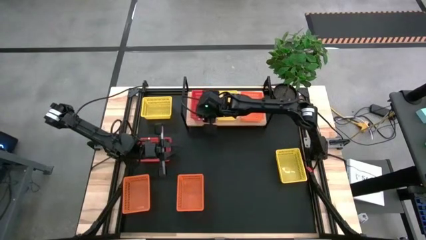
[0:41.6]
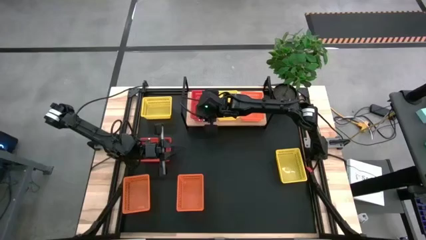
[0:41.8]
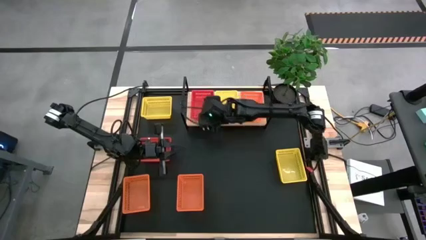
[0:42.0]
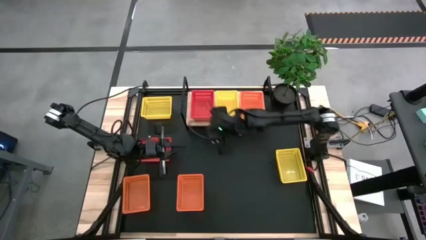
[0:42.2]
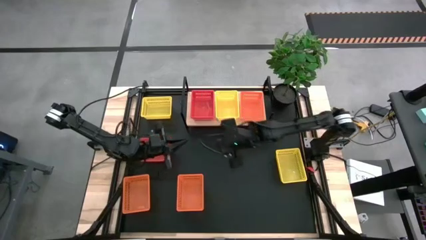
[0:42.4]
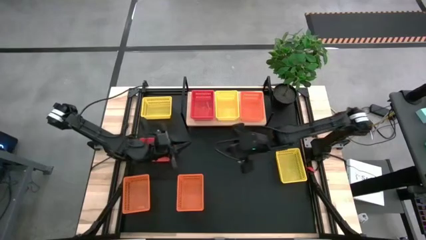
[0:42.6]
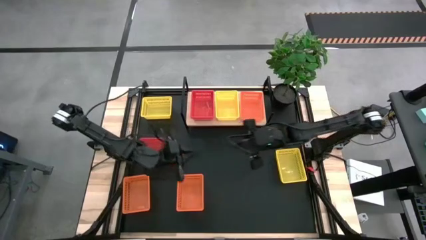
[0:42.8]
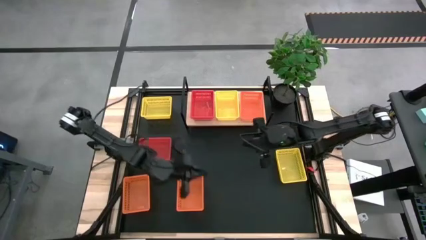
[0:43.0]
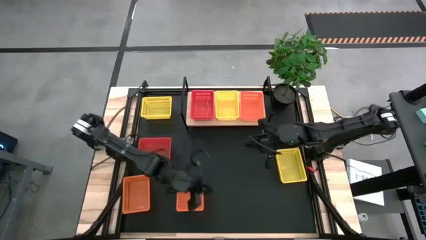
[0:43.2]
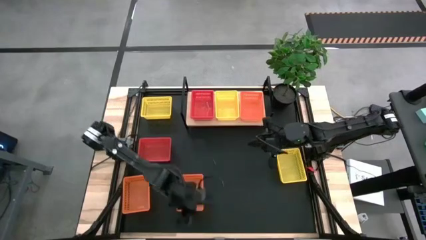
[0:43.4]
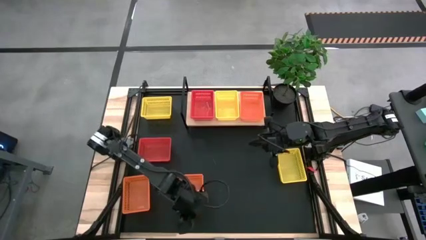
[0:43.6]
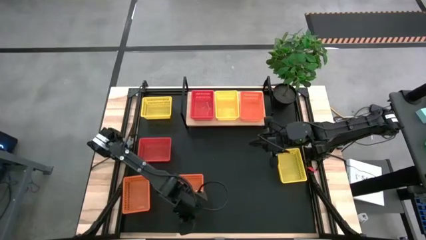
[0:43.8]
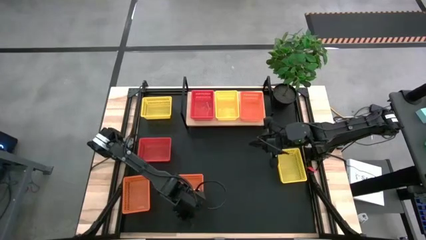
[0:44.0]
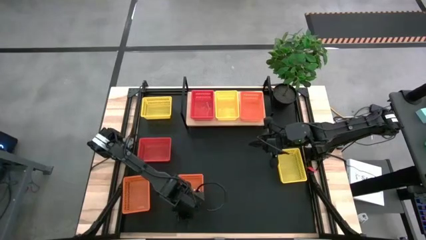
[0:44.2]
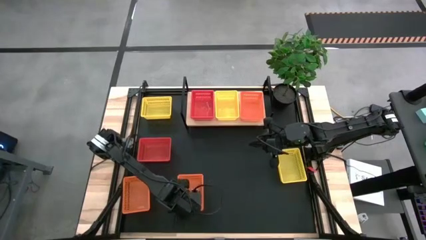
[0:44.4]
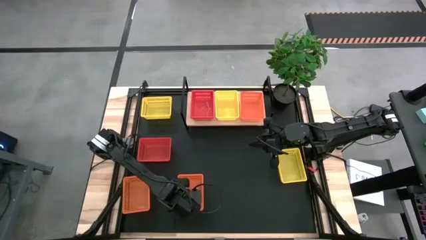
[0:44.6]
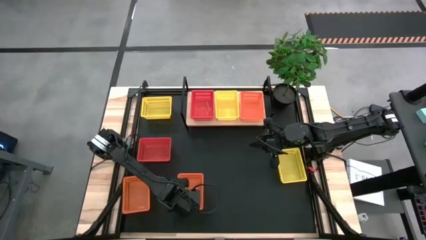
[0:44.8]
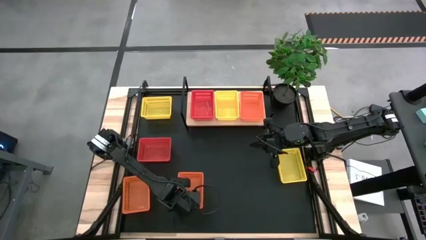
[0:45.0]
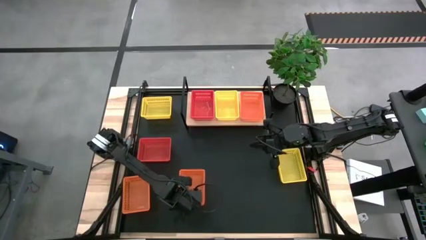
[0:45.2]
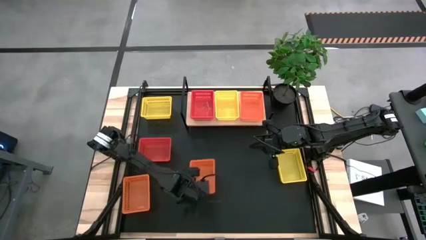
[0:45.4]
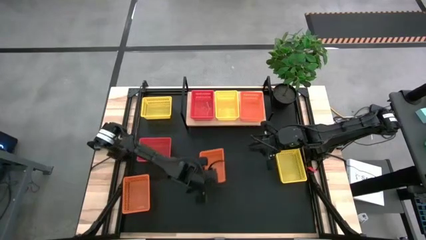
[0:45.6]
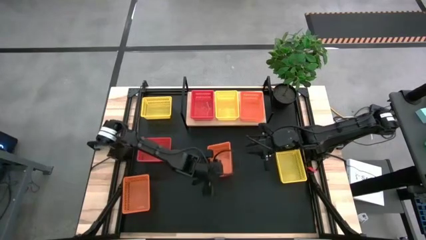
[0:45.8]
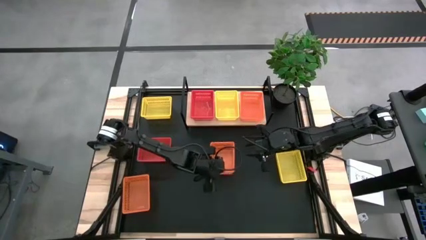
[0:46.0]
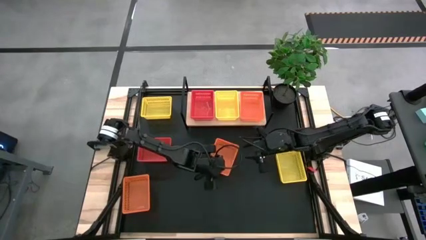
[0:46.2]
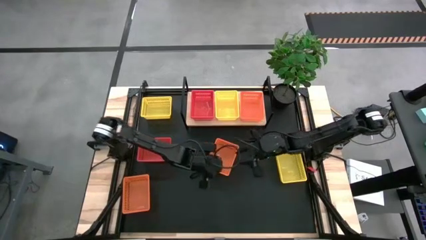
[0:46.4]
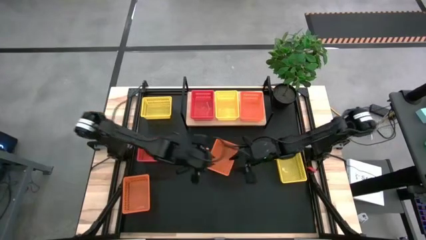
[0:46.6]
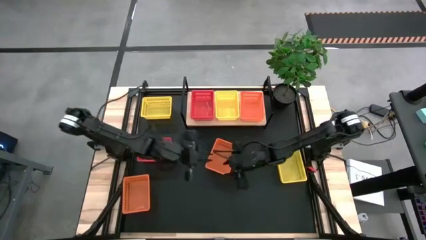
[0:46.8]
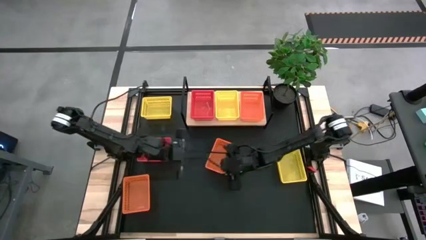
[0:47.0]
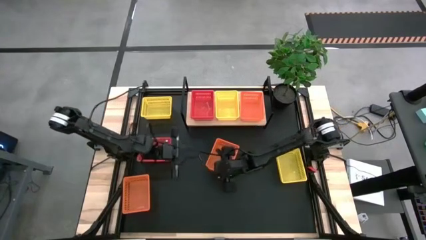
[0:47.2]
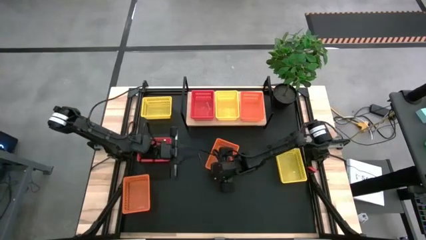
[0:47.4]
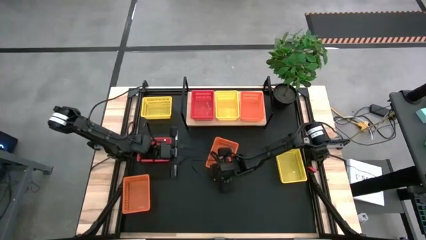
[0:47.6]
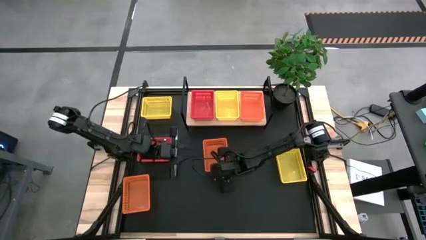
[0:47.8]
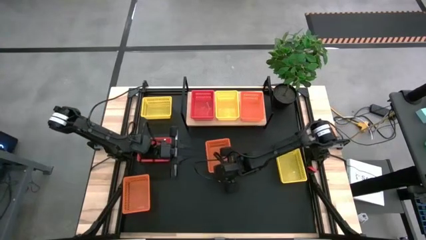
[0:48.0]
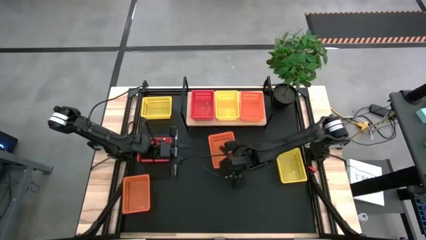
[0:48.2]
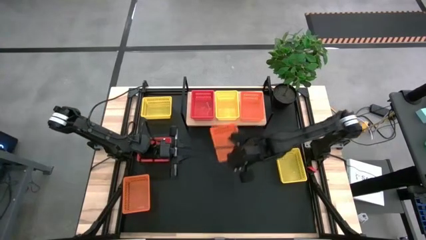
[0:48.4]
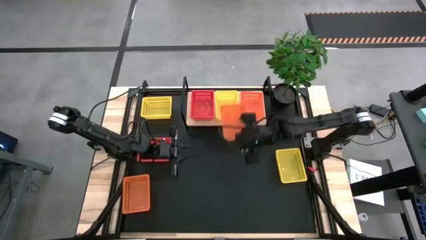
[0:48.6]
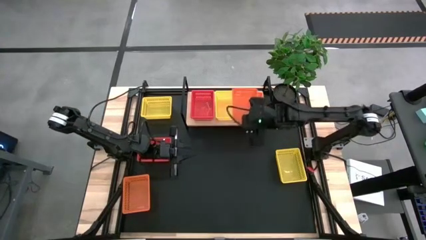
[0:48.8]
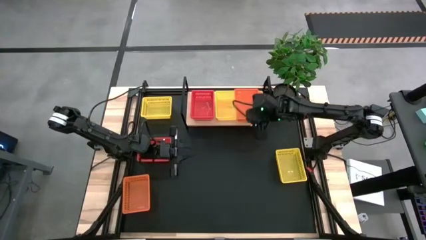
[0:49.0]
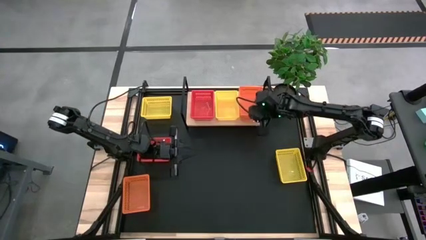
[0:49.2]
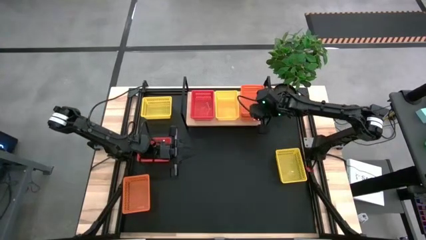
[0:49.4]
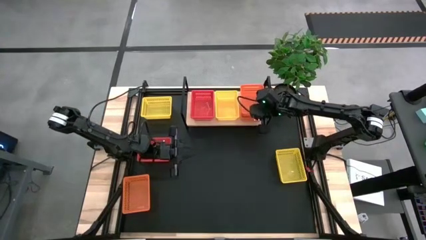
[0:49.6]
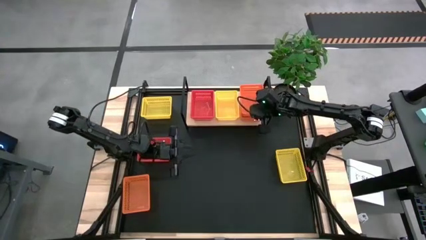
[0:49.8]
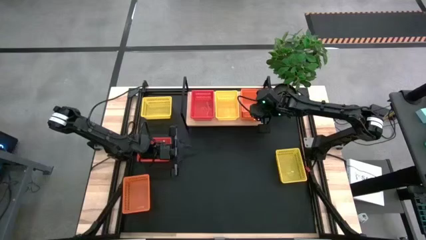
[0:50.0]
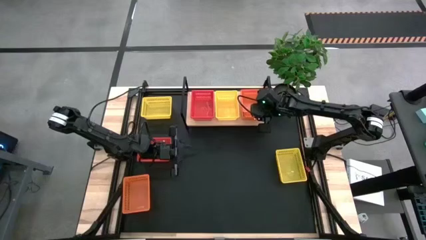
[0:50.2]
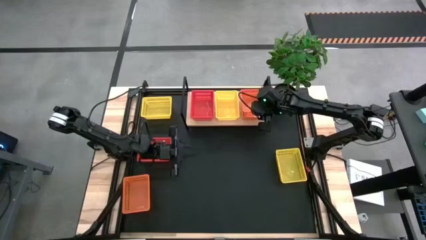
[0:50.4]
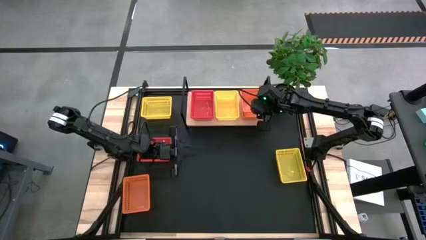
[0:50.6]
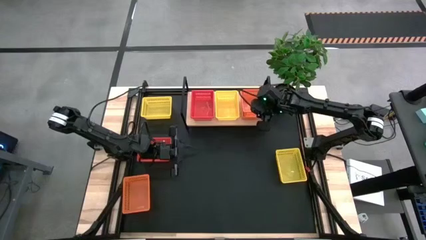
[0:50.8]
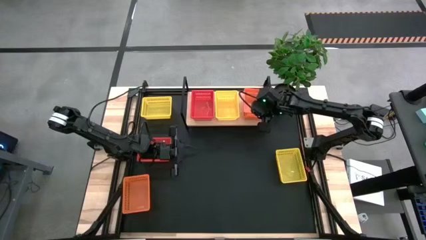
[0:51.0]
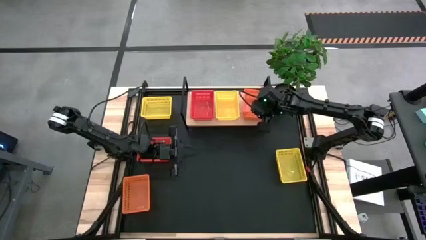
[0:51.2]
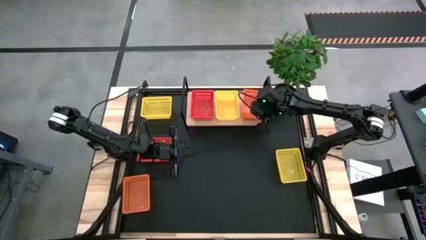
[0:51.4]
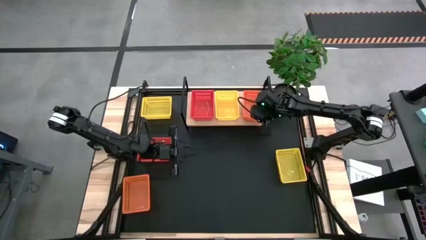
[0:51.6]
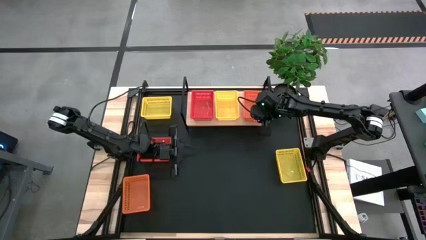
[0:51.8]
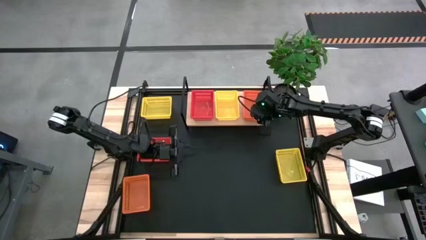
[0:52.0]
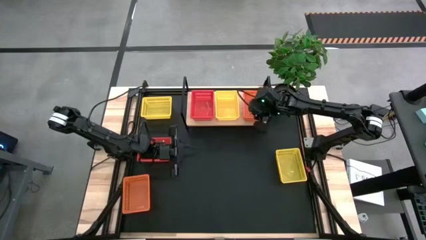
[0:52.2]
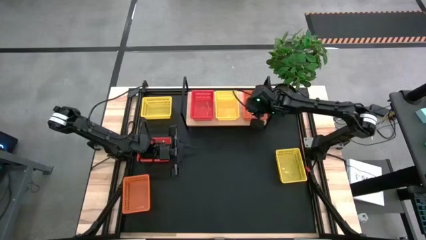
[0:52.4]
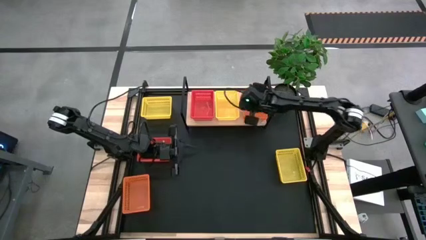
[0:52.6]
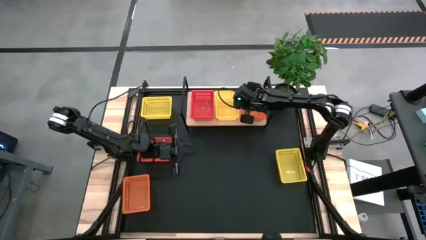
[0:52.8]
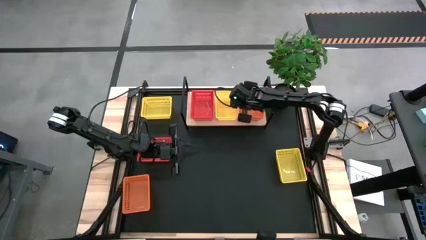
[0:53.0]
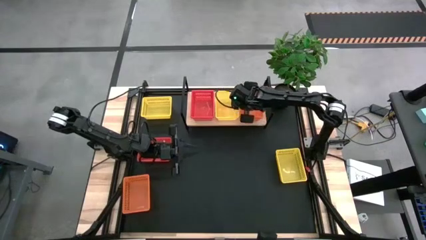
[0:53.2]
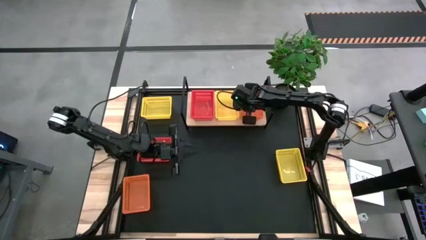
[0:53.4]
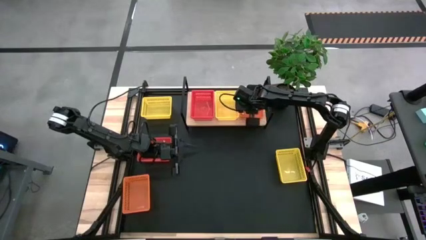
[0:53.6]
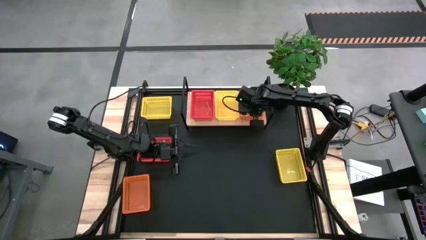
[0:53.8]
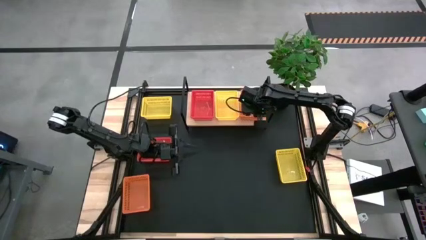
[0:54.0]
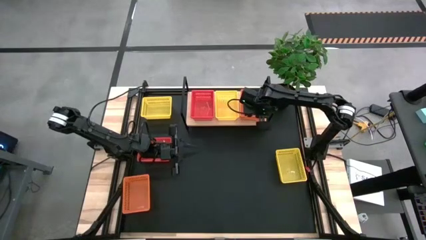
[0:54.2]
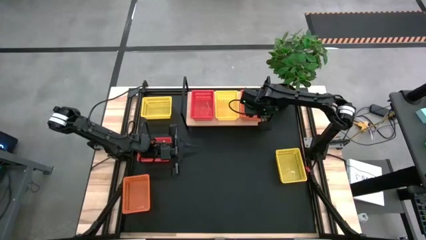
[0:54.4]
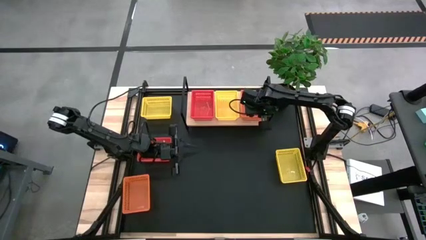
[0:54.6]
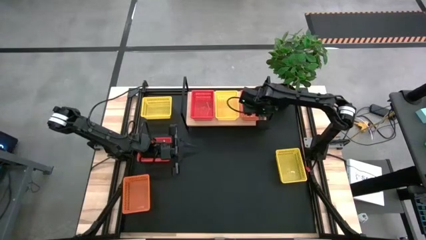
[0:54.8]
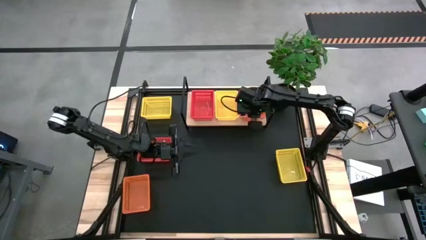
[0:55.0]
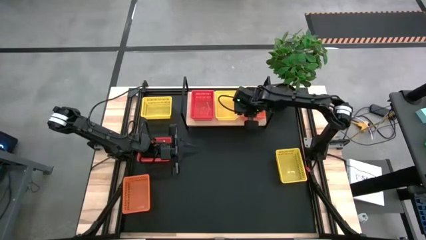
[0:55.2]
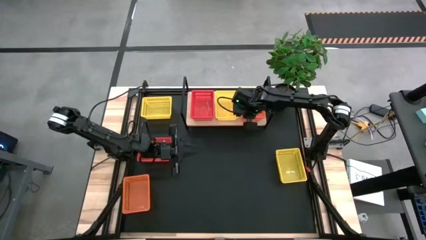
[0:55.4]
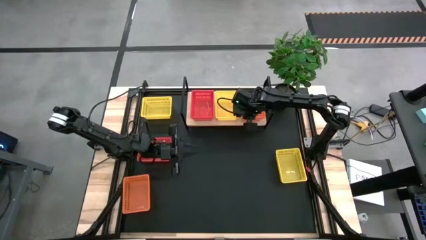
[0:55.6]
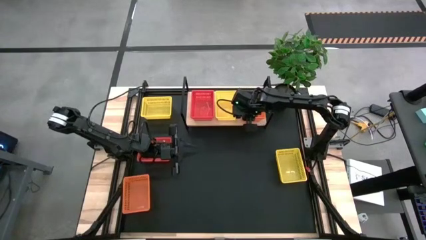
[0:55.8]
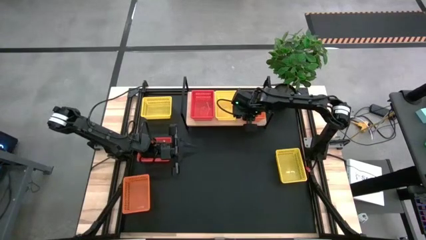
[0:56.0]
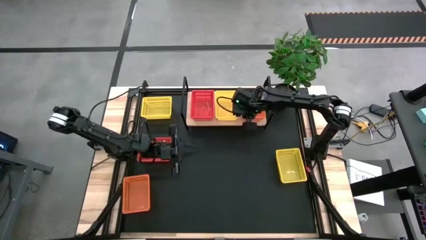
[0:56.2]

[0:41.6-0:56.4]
Task: Stack baskets on shelf by color
Stack the right orange bin on top of the orange bin on the shelf

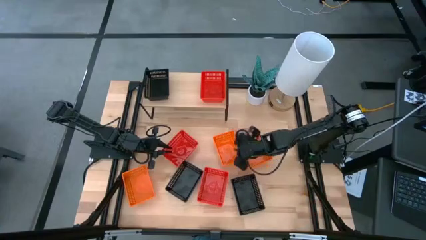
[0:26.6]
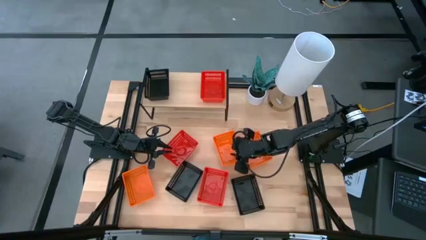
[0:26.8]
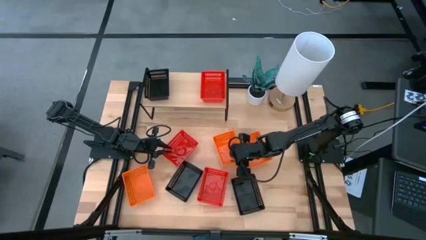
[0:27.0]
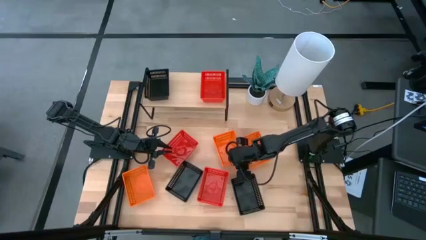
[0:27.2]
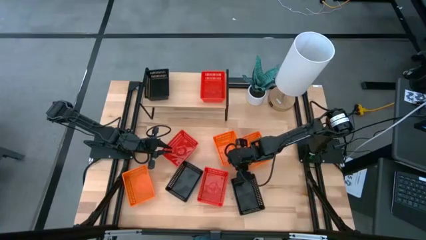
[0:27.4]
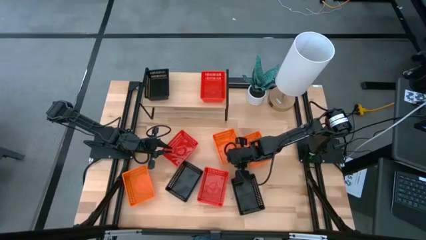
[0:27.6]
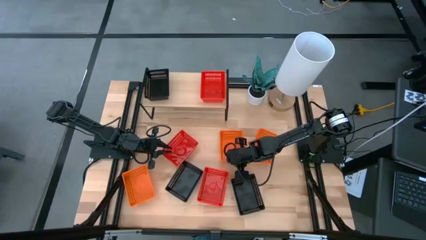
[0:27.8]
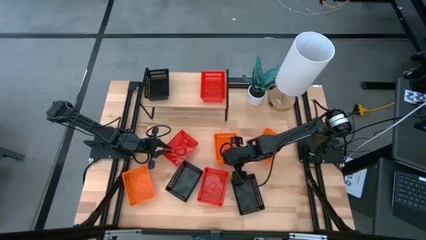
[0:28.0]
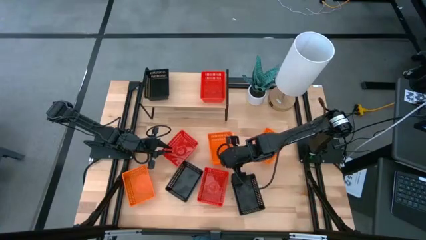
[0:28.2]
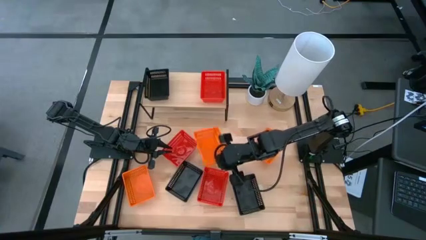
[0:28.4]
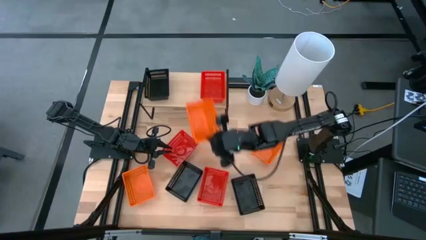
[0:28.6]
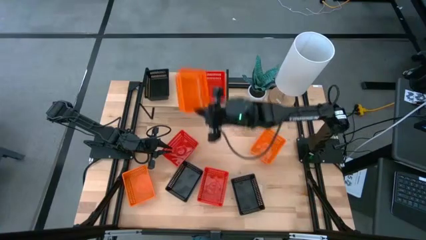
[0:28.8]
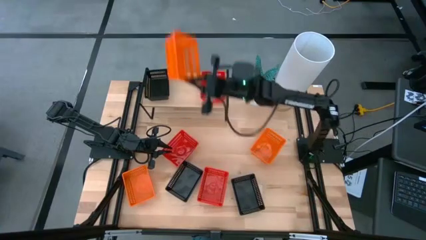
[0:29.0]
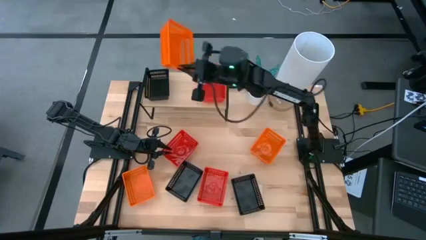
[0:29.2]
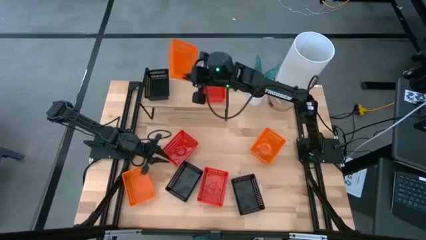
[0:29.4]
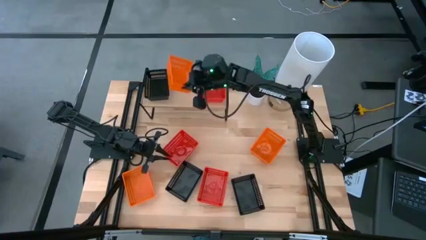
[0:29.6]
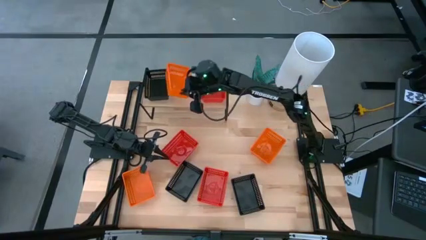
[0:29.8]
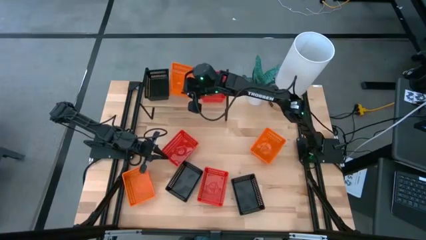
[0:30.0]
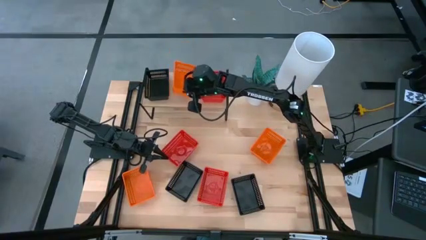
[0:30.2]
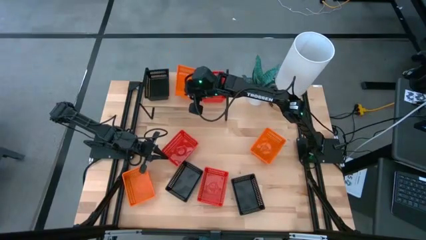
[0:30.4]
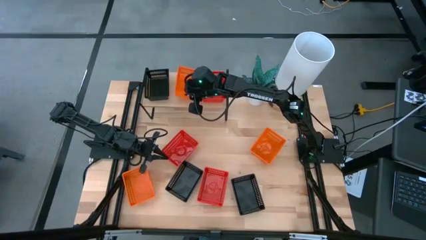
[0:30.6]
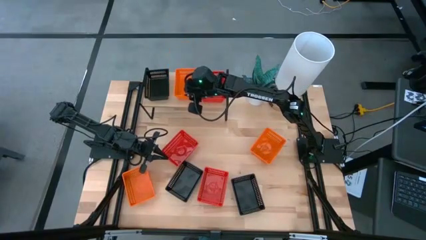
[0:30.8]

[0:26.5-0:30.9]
Task: Stack baskets on shelf by color
Put the top left orange bin on the shelf
